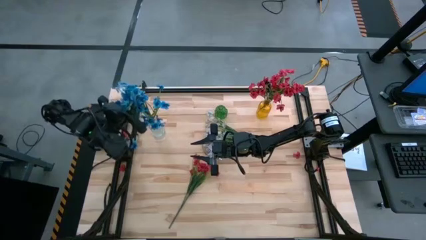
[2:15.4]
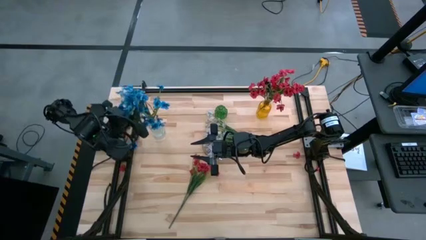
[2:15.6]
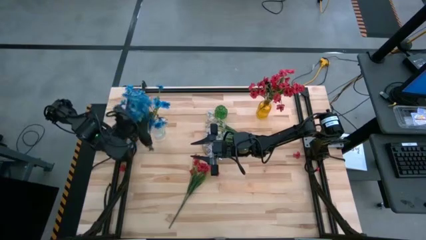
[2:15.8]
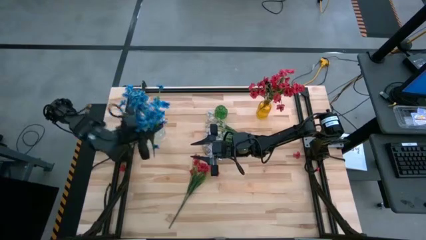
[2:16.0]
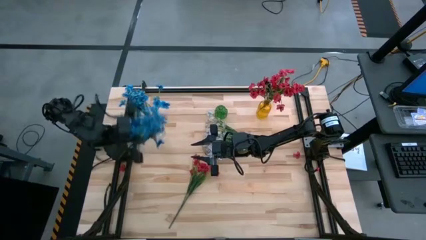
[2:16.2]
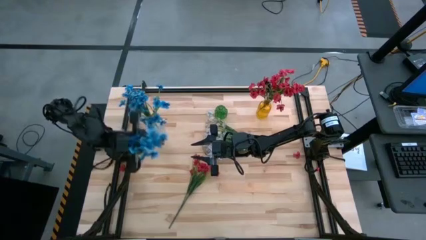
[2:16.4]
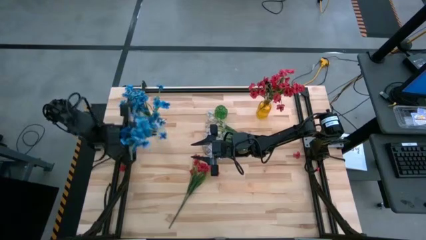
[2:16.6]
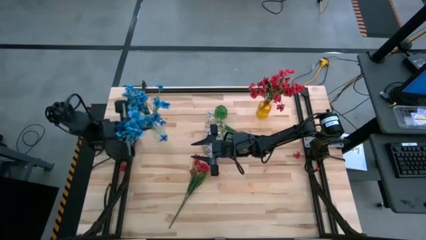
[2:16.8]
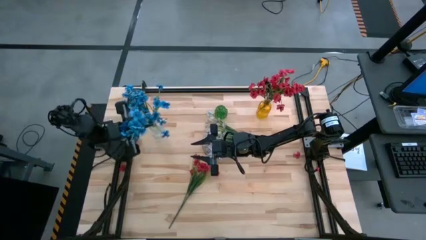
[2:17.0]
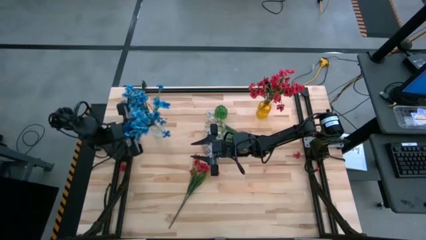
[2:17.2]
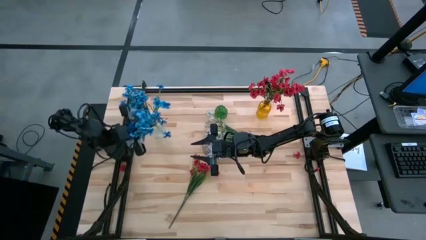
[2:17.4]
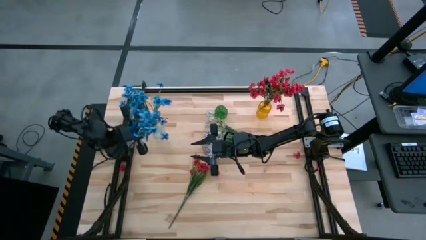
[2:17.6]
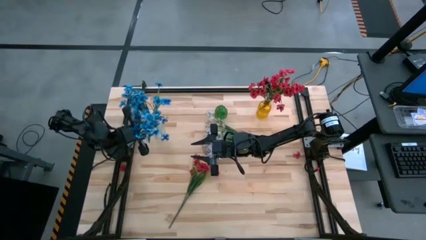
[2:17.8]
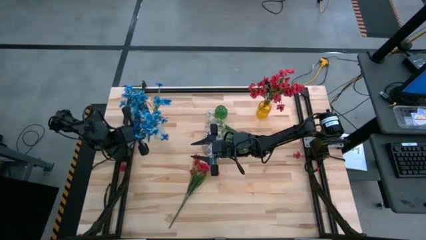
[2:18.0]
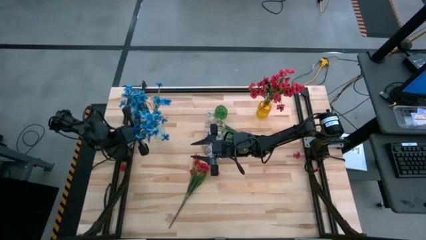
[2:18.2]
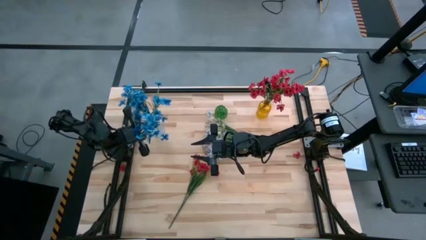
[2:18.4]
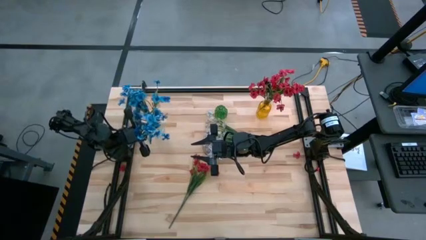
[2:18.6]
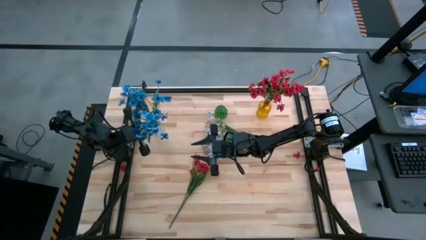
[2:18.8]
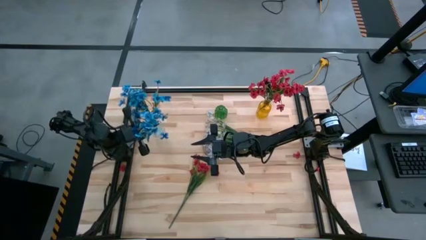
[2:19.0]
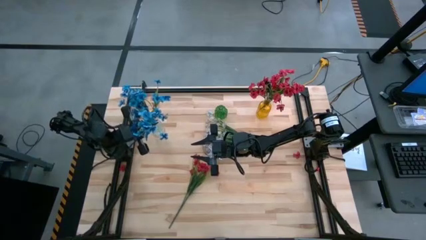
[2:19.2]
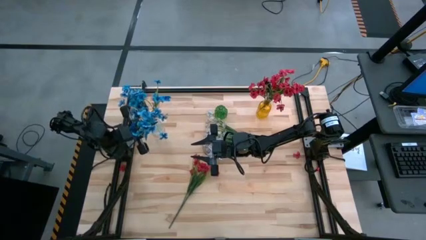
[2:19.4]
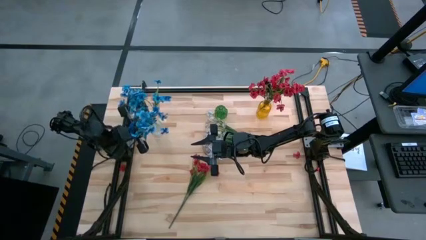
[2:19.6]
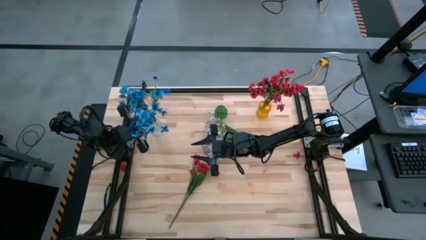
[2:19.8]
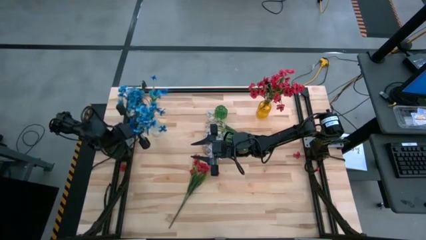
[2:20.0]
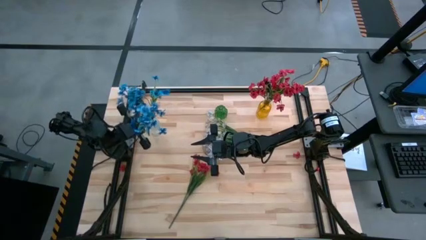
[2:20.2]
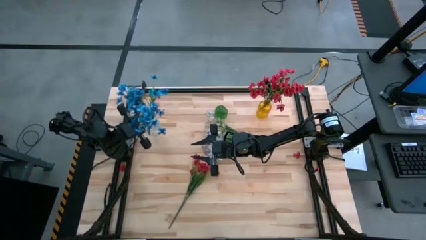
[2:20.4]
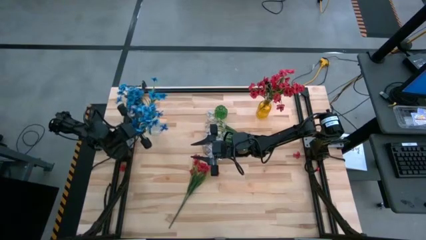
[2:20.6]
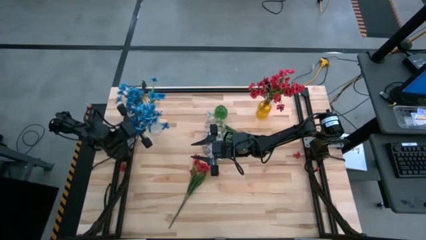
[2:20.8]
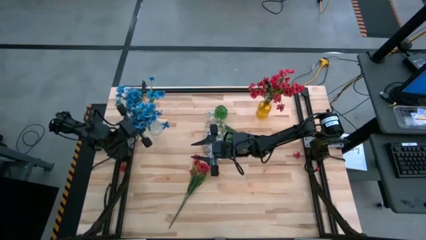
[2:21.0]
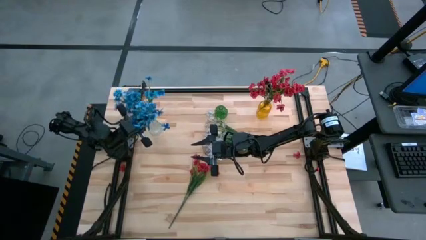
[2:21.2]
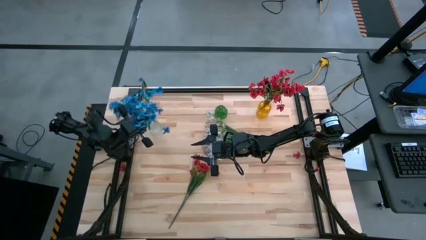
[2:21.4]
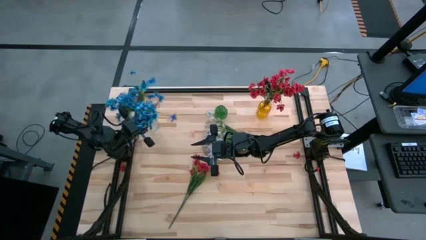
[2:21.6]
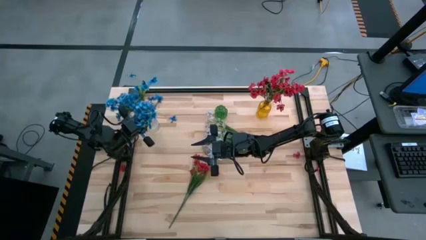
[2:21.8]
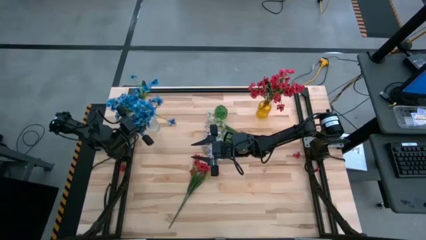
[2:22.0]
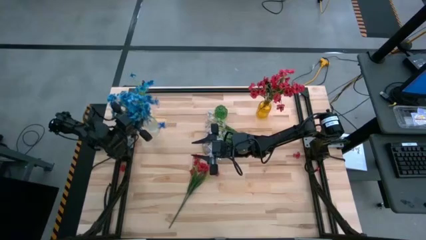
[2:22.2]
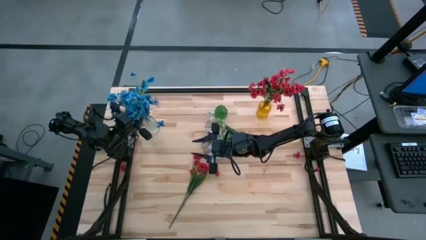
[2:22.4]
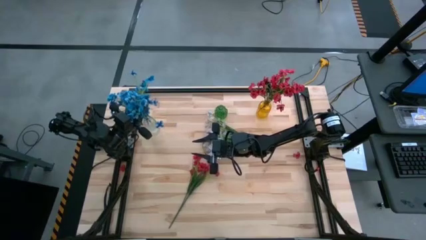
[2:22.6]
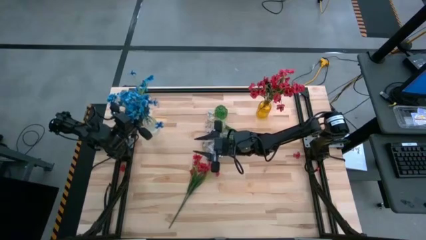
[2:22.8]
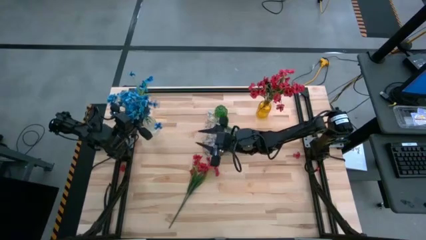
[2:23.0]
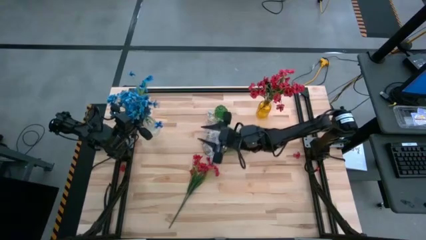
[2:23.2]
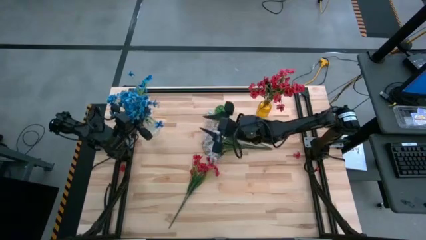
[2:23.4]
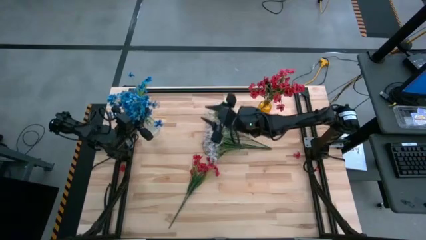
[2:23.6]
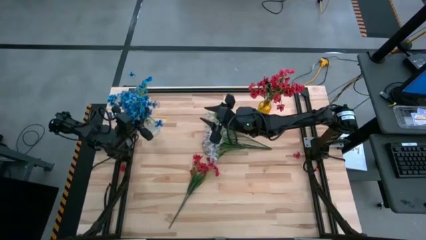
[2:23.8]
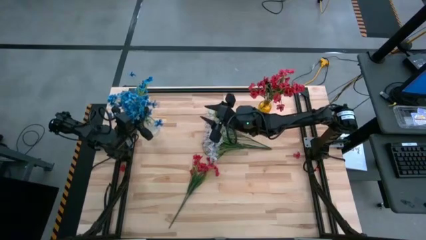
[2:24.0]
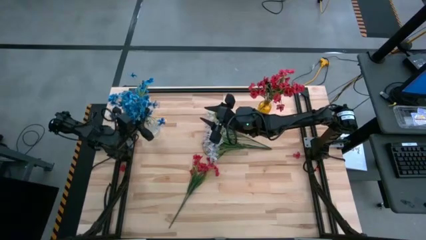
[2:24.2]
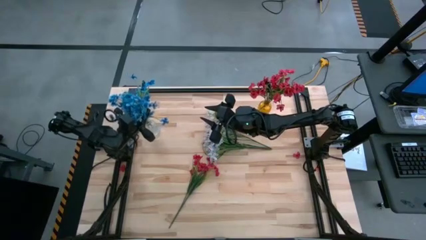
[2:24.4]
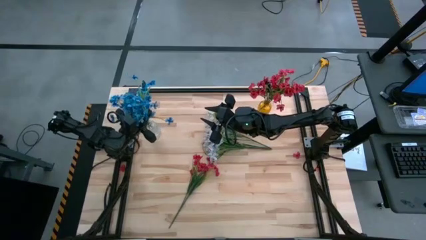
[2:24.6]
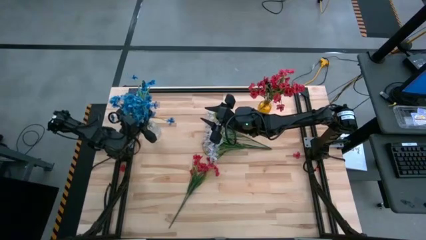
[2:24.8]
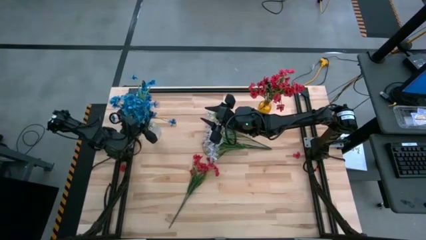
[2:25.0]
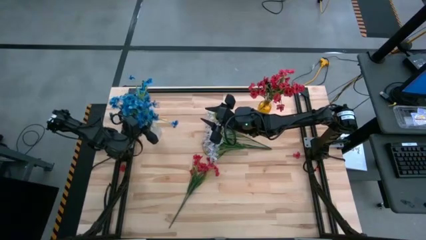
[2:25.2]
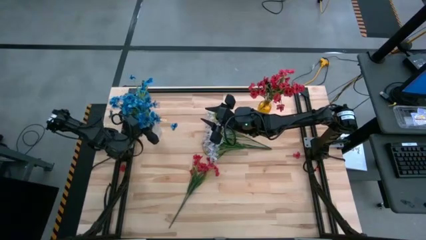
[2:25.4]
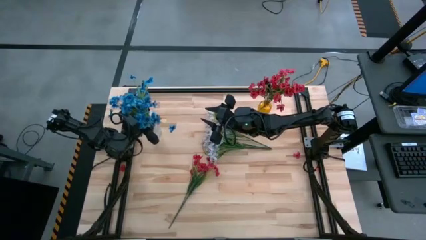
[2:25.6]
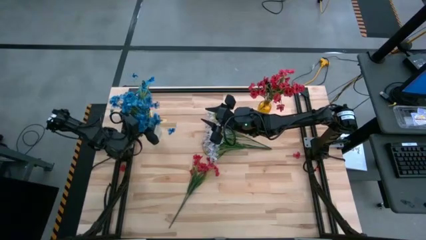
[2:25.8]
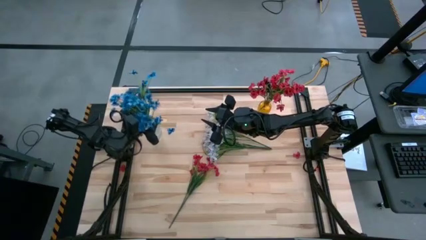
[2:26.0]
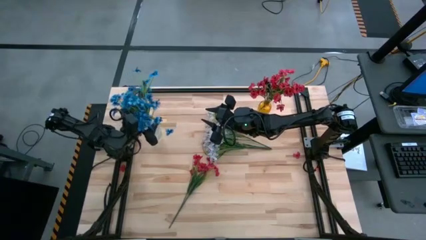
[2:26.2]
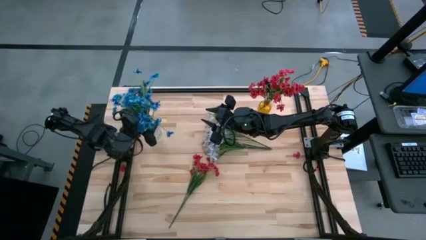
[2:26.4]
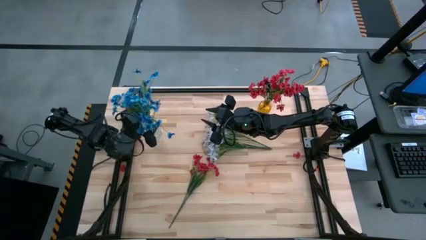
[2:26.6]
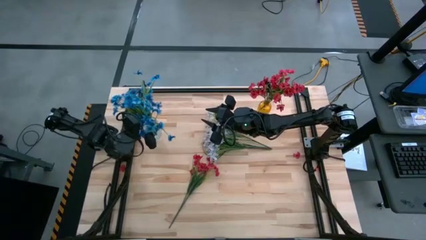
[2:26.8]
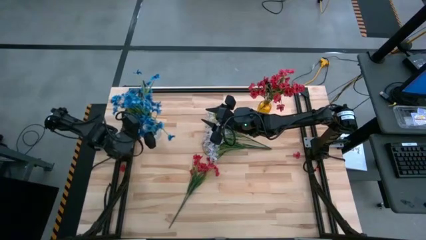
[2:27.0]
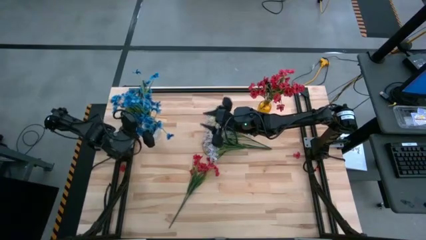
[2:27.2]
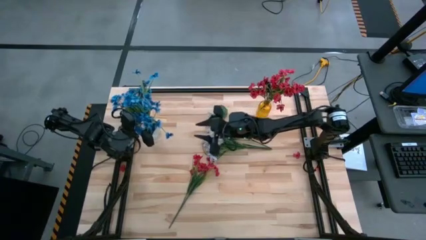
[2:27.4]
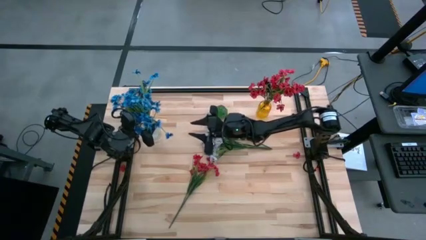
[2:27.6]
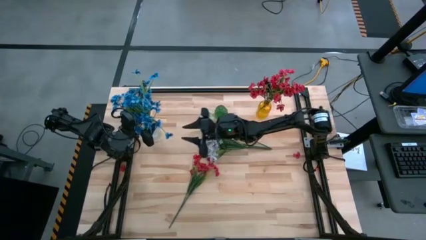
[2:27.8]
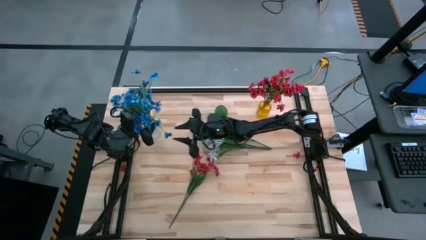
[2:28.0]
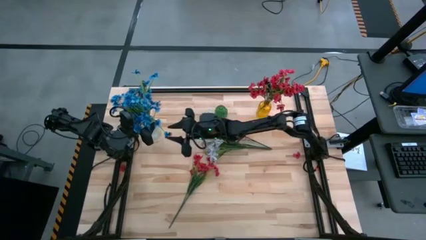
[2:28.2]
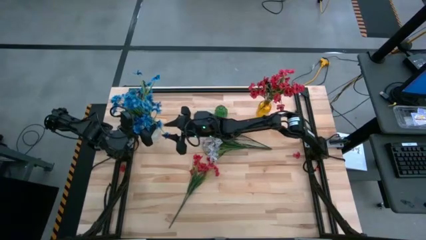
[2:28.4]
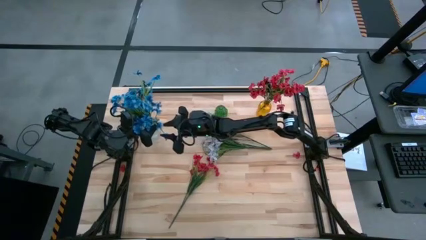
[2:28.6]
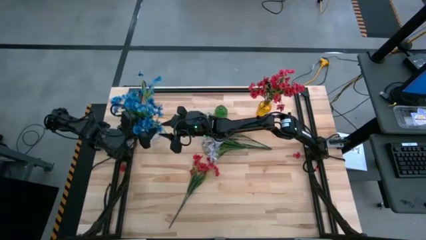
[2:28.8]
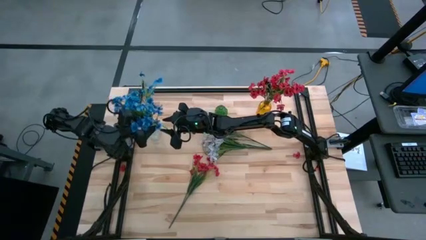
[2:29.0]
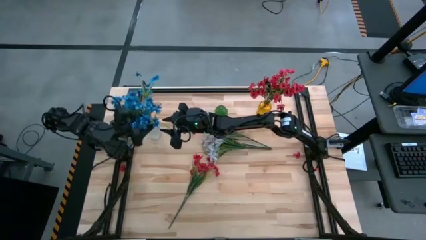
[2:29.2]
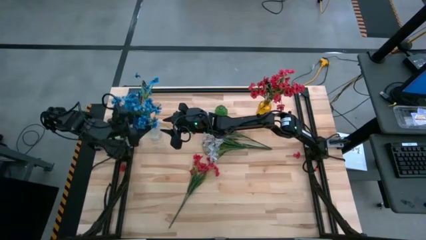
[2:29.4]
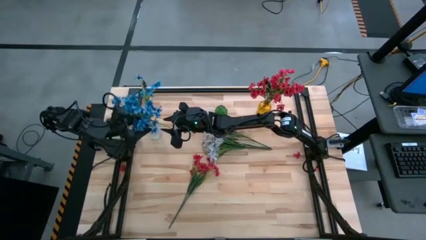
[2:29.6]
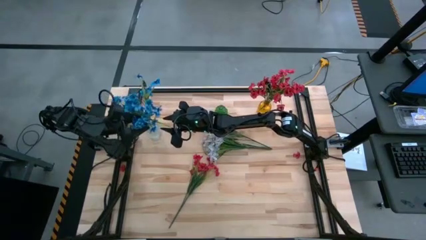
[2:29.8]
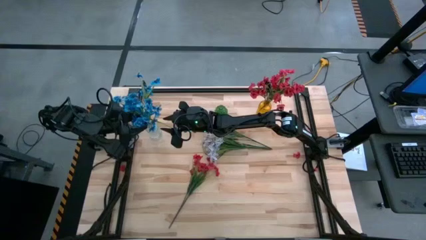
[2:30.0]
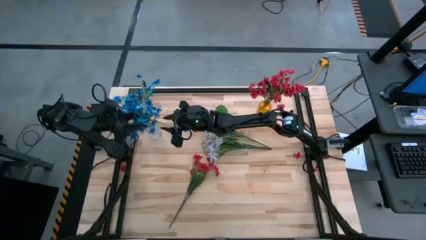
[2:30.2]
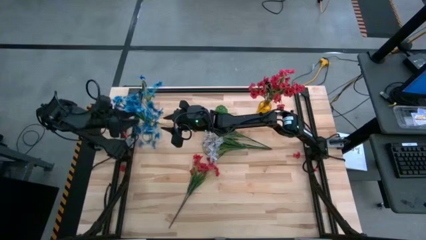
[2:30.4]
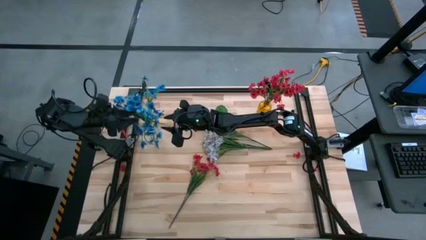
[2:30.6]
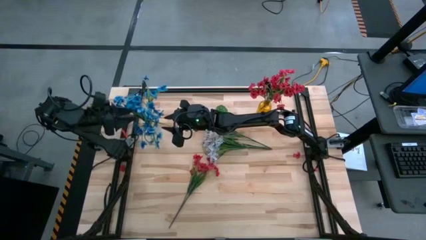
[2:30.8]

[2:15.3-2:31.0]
Task: Sort flowers into vase by color
Put the blue flowers into the transparent vase
